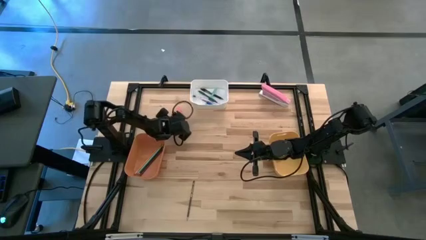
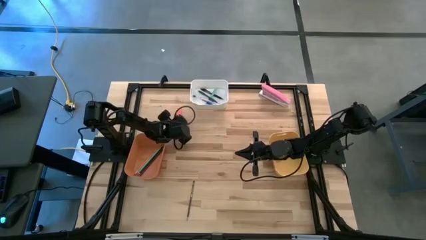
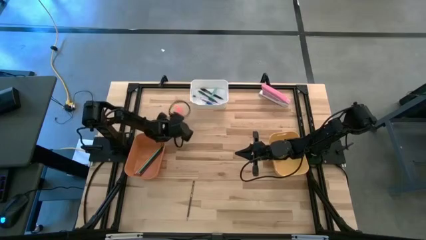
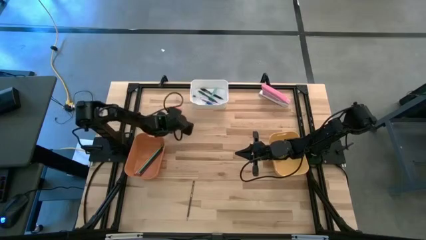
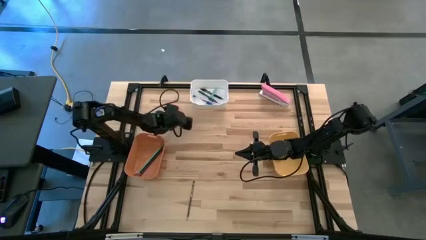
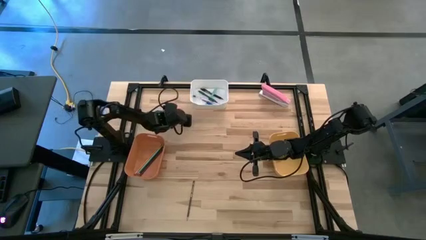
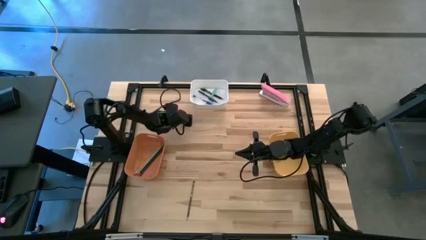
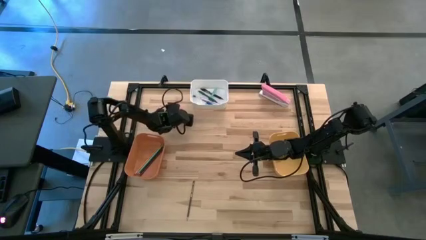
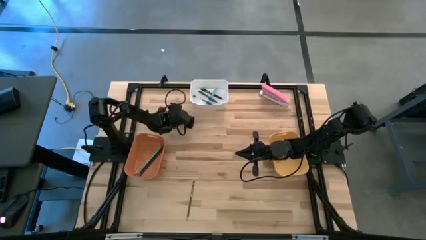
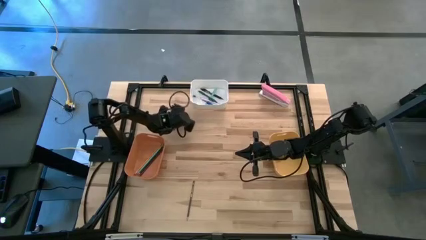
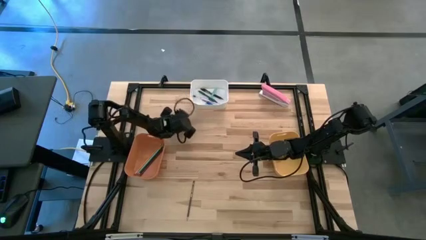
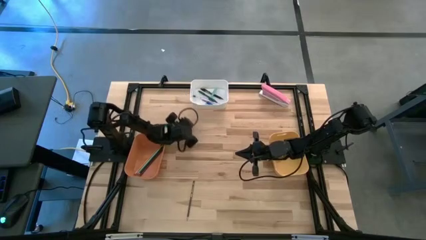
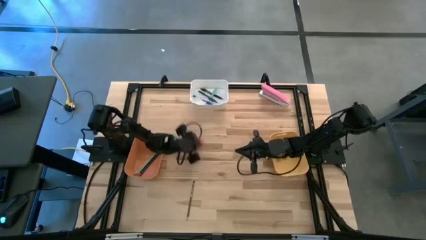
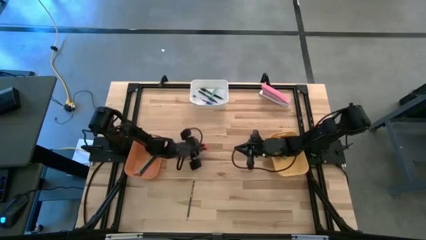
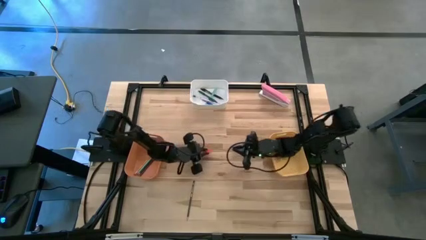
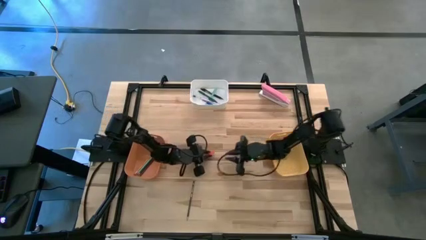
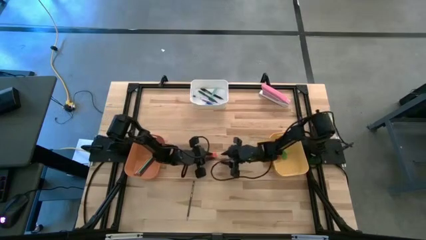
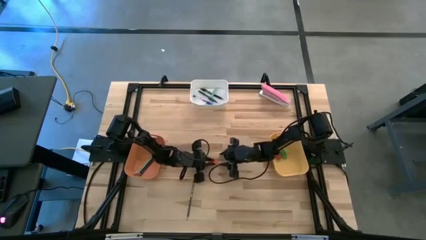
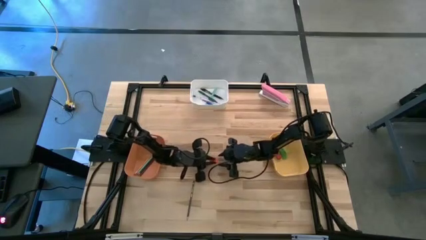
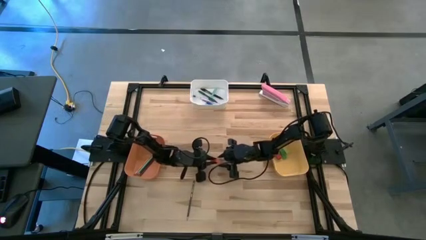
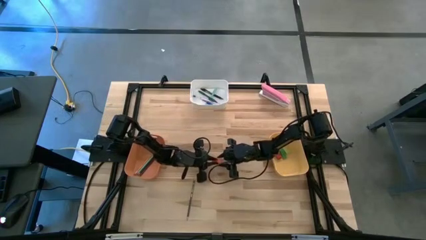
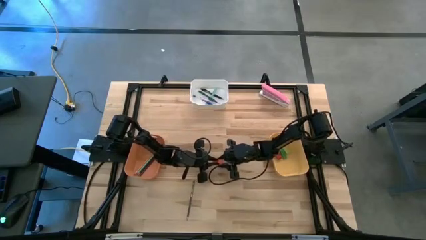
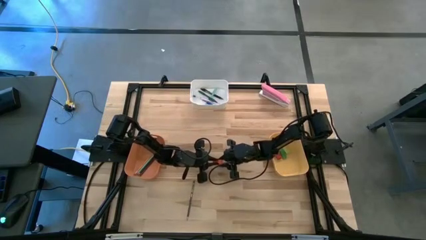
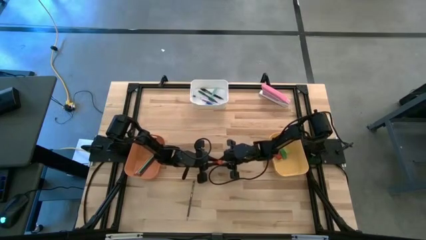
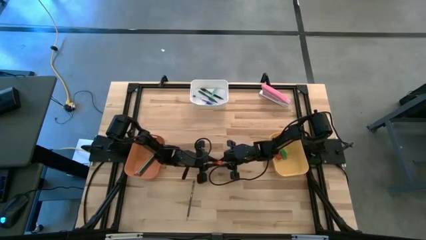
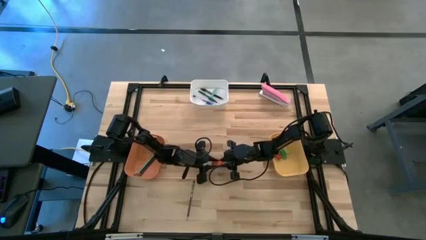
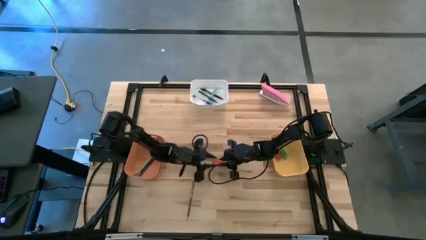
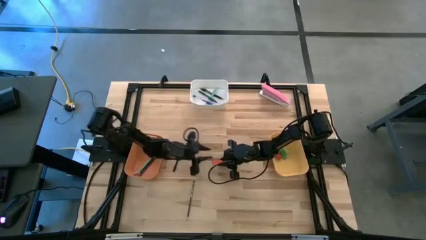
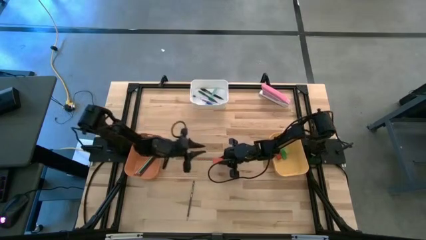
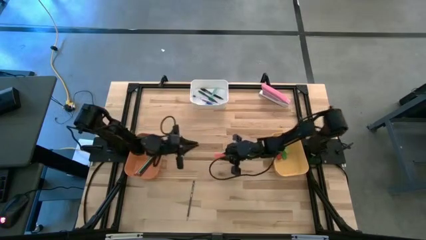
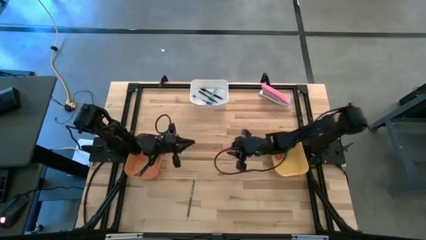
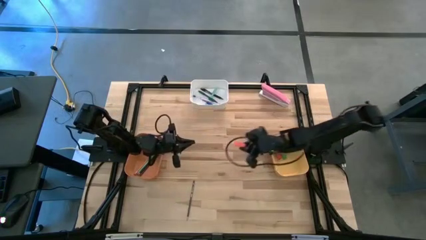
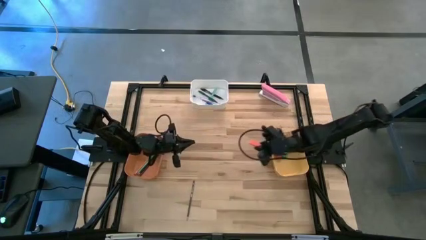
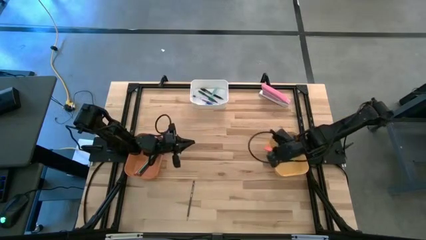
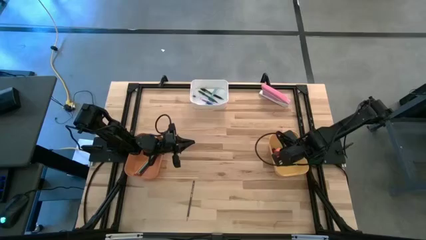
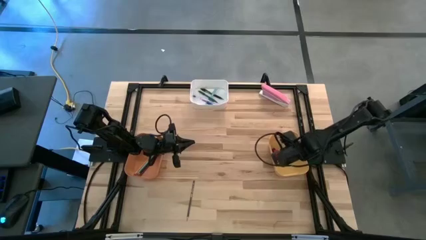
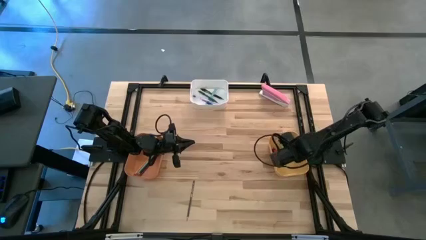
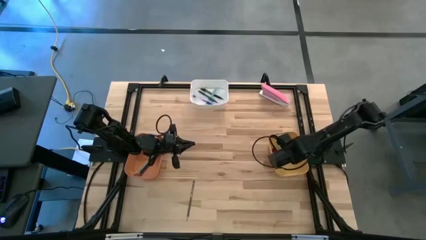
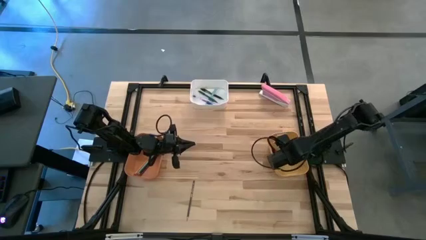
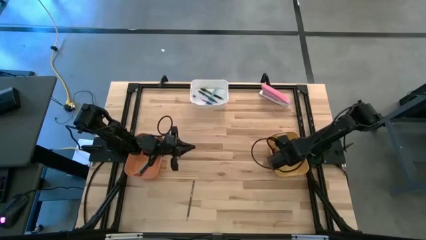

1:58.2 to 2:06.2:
Task: Sort crayons/erasers/pens/pencils in bins
Put the orange eraser into the yellow bin

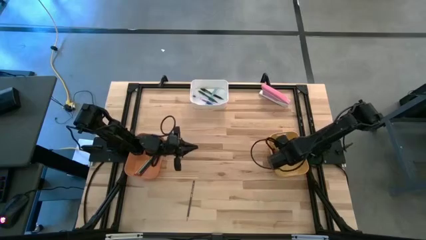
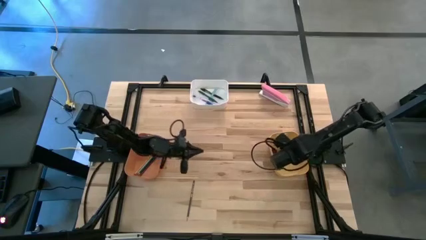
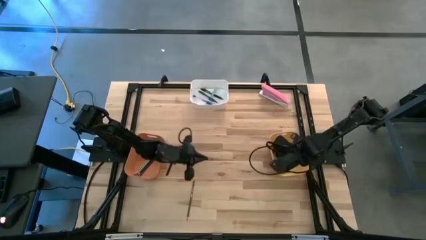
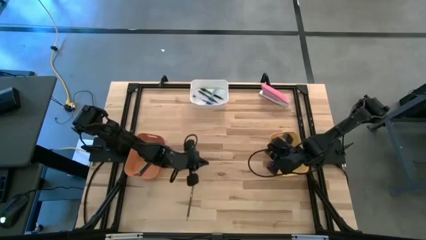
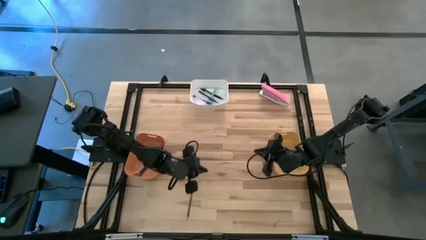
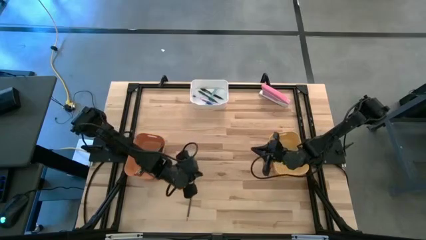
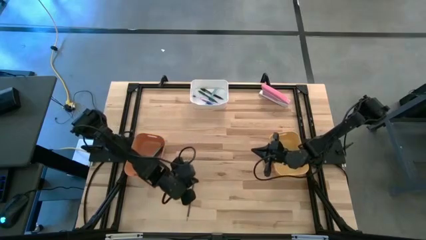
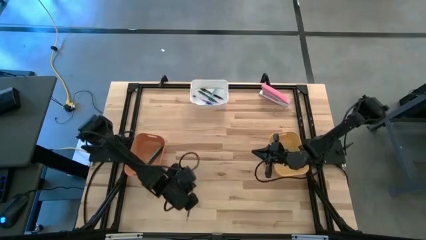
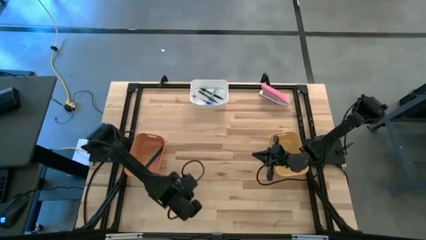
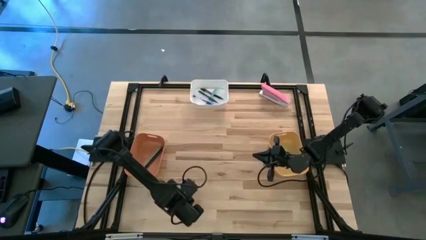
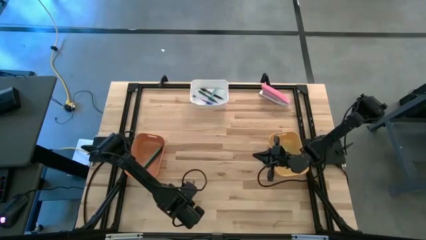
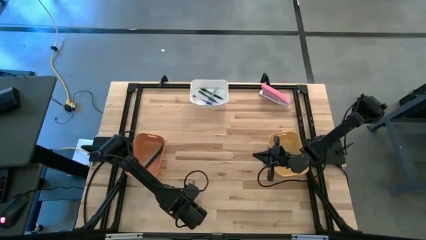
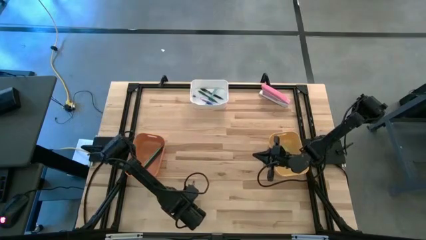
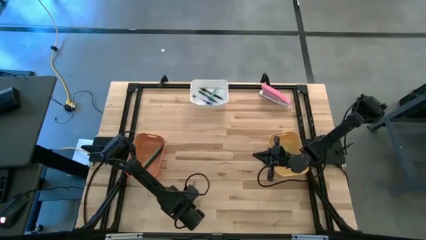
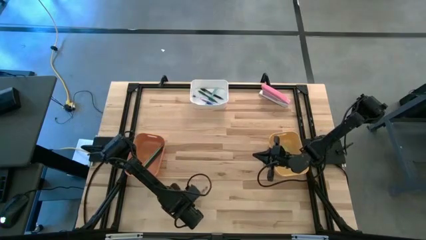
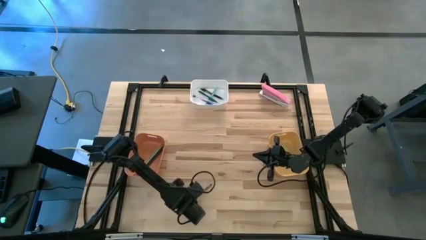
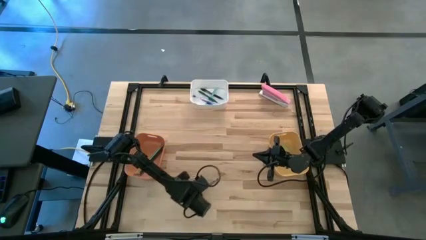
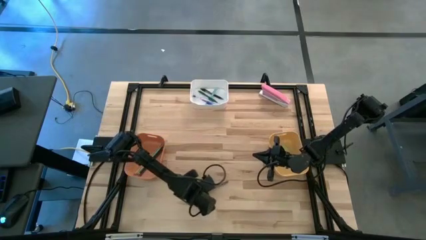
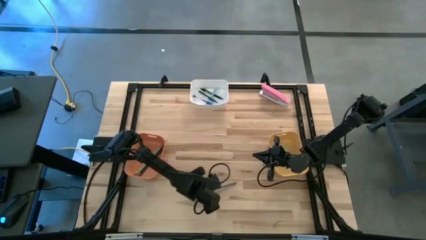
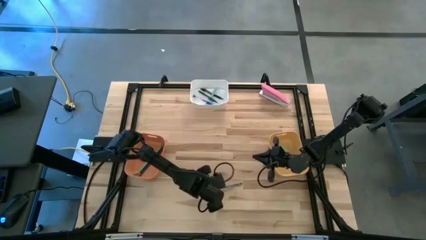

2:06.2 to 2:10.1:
Put the blue pencil into the orange bin

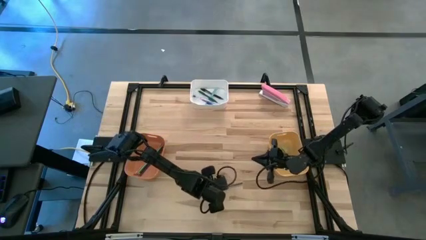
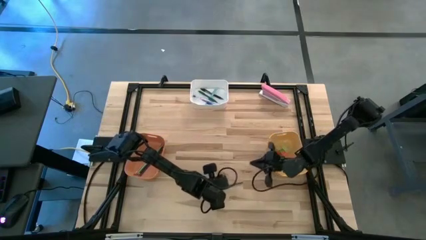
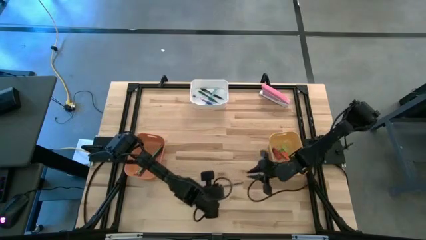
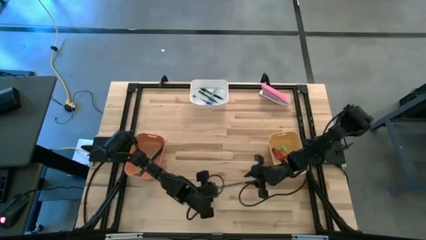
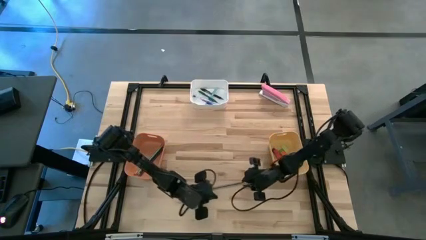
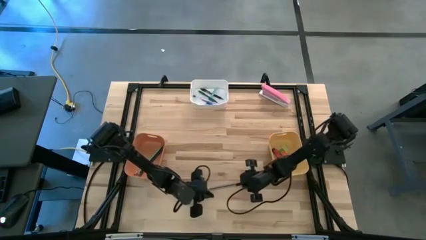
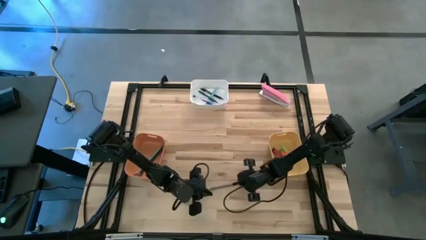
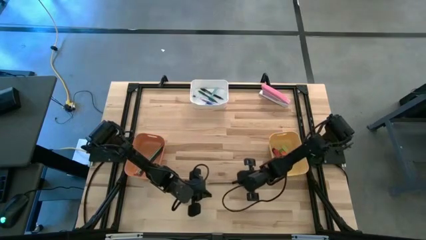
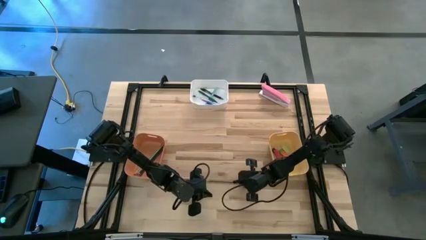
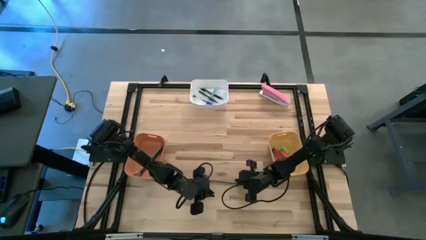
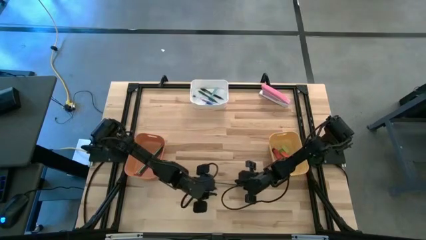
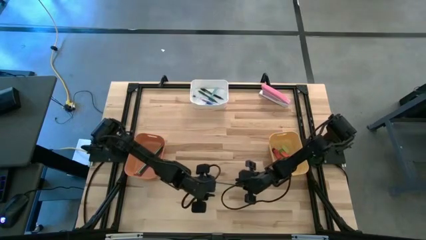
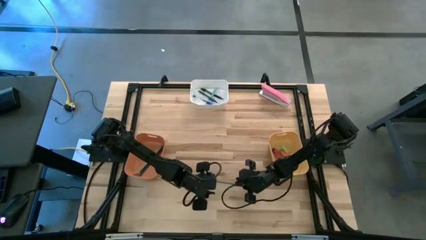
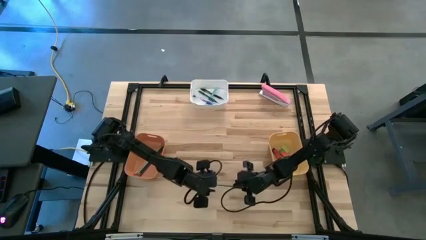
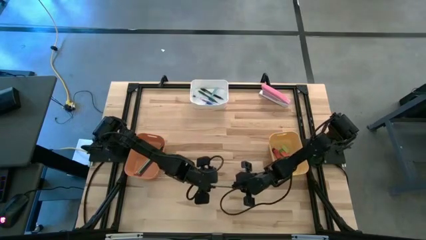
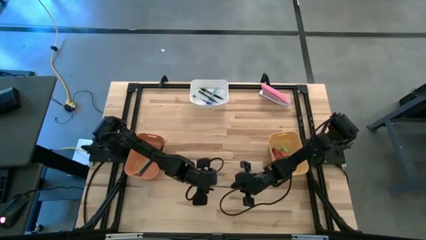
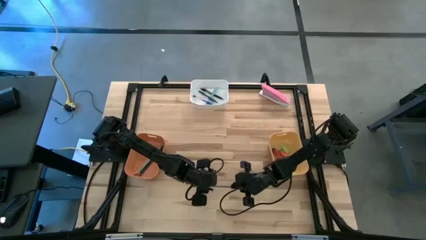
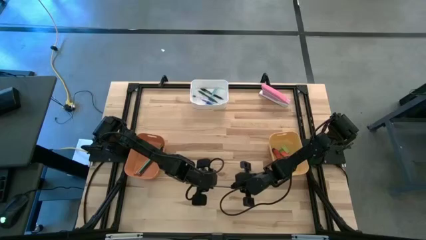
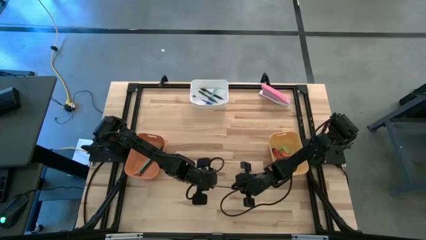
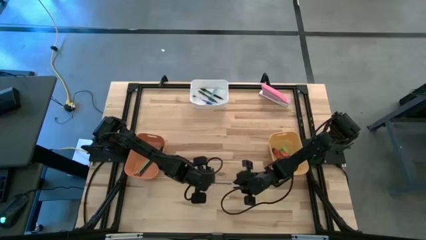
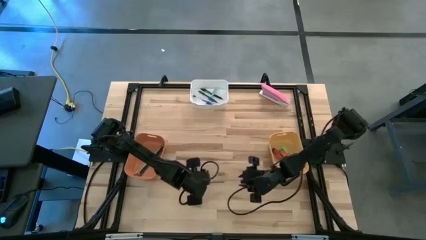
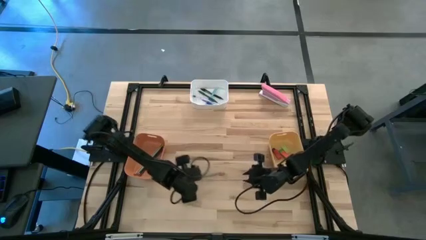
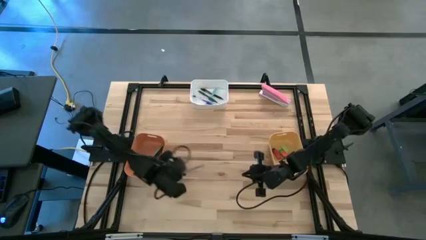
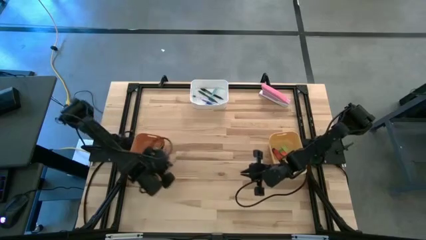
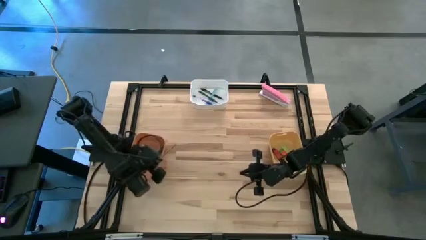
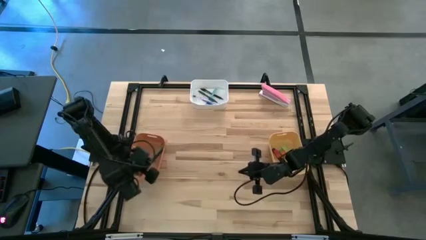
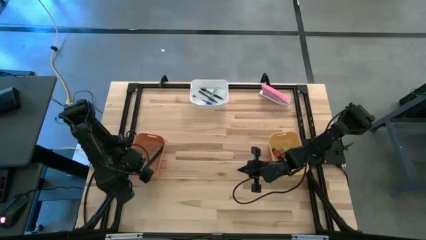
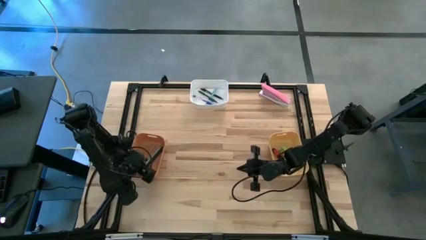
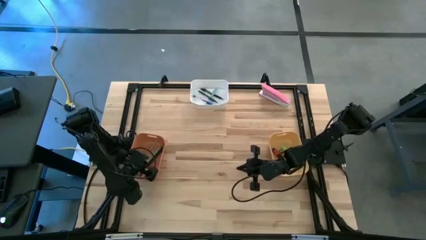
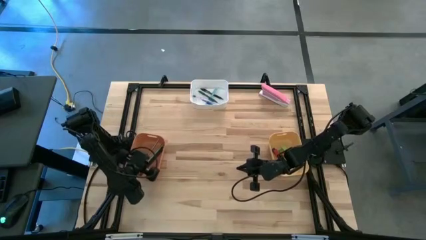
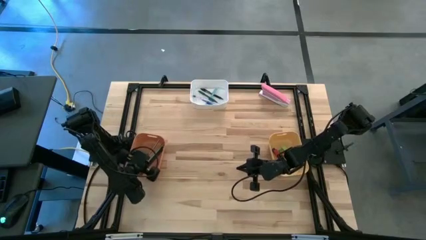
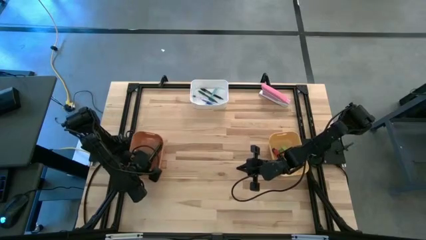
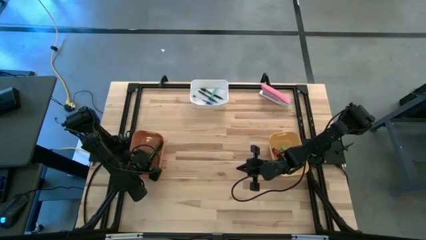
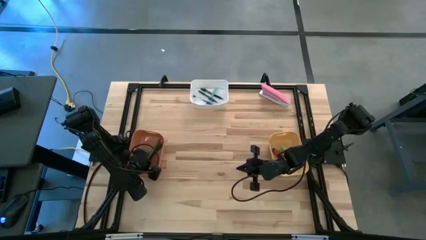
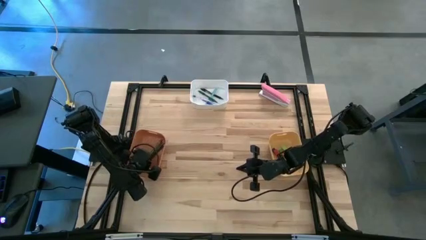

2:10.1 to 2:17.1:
Put the blue pencil into the orange bin
